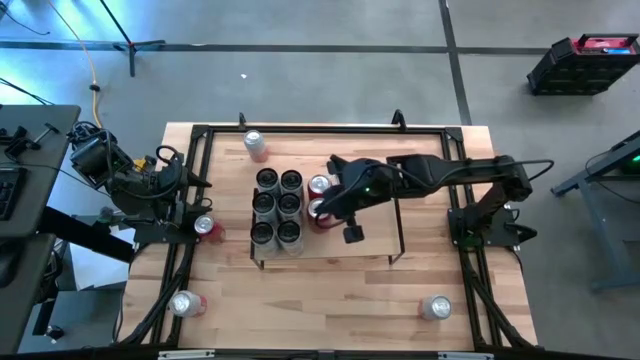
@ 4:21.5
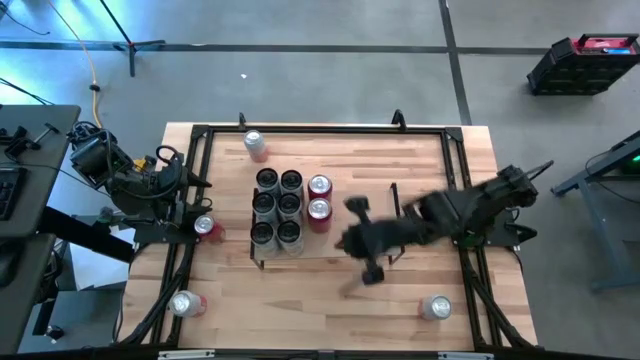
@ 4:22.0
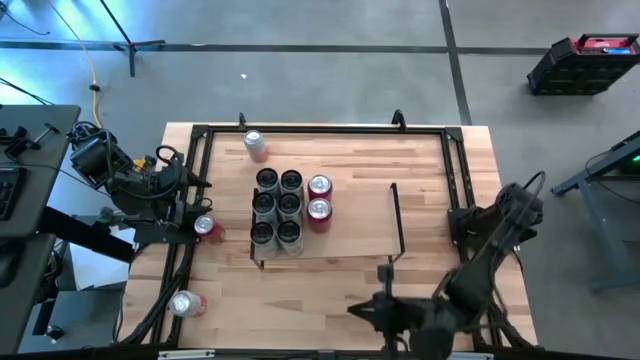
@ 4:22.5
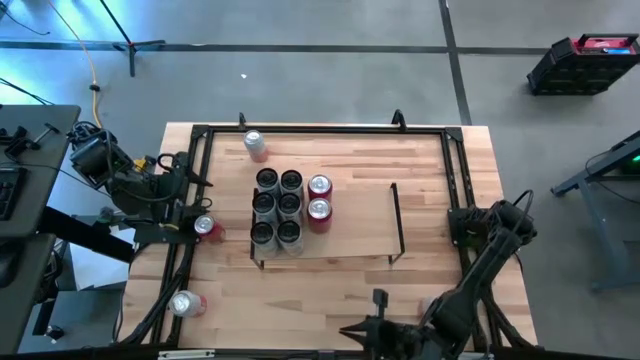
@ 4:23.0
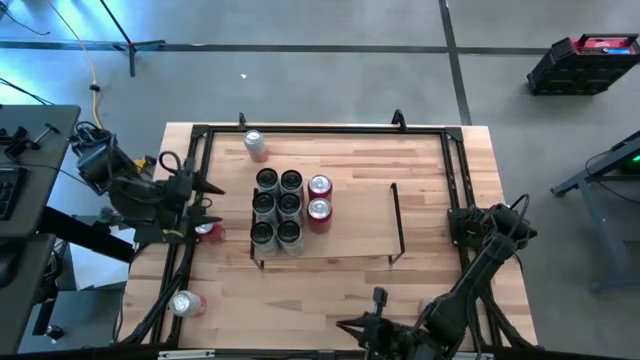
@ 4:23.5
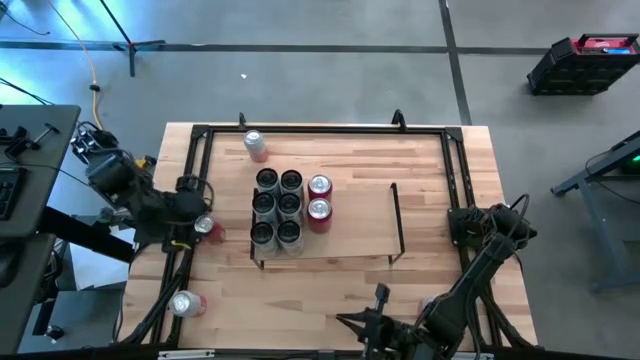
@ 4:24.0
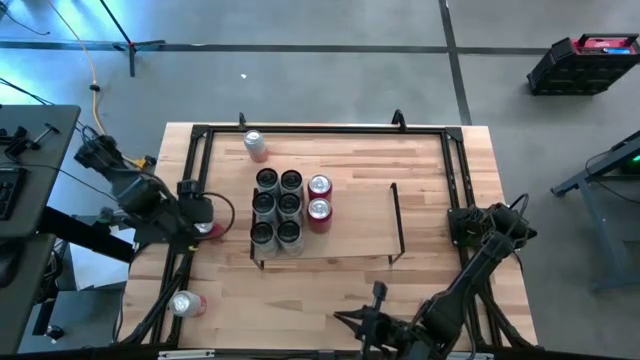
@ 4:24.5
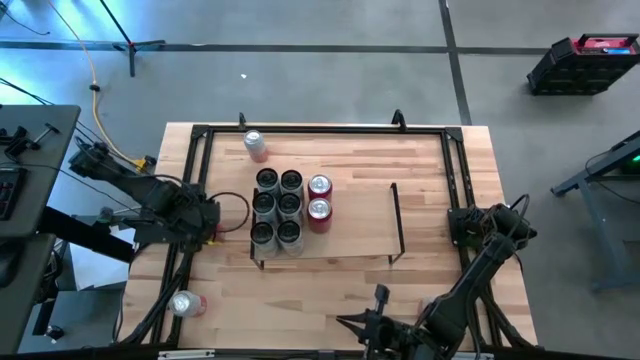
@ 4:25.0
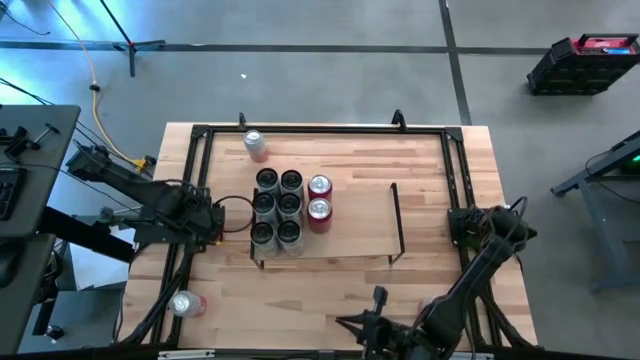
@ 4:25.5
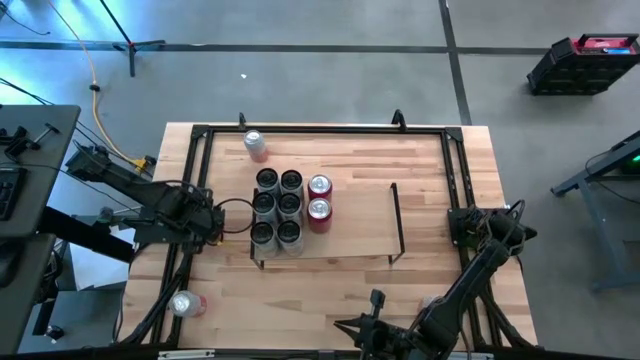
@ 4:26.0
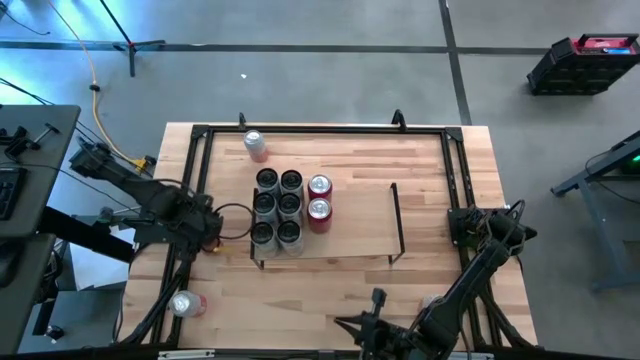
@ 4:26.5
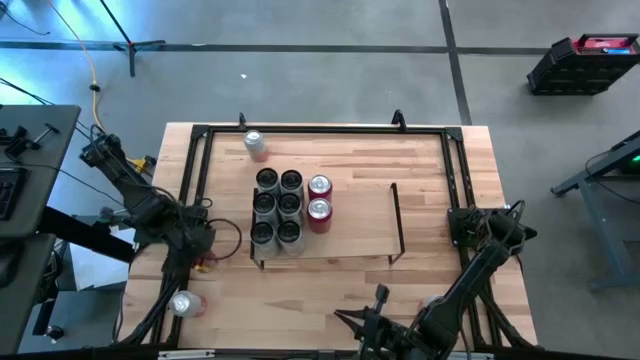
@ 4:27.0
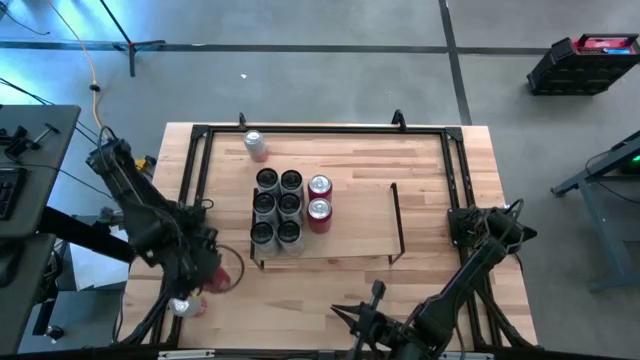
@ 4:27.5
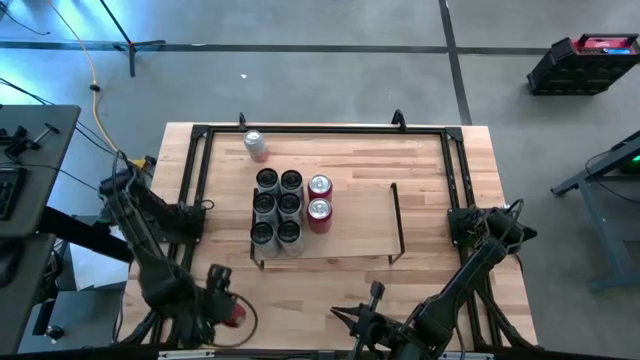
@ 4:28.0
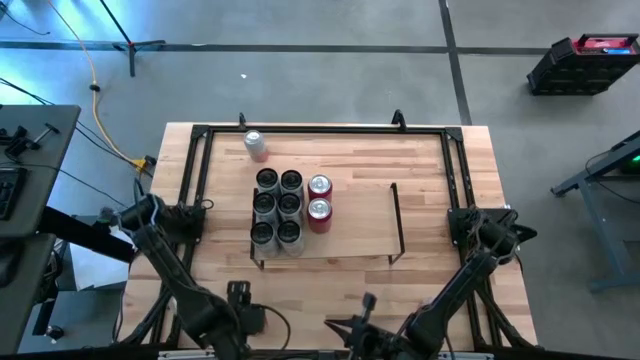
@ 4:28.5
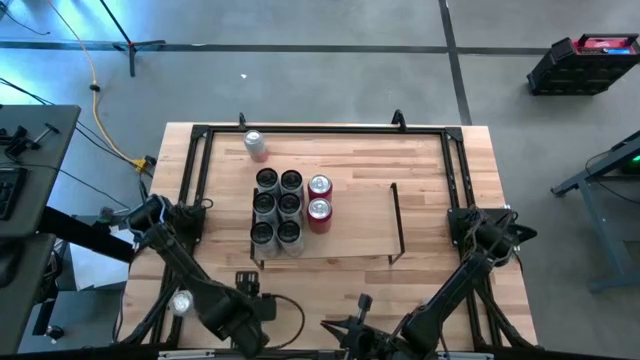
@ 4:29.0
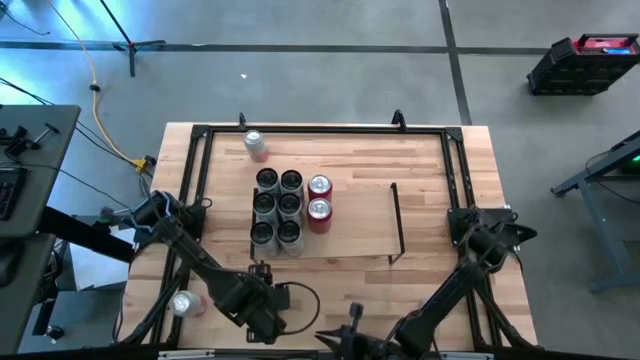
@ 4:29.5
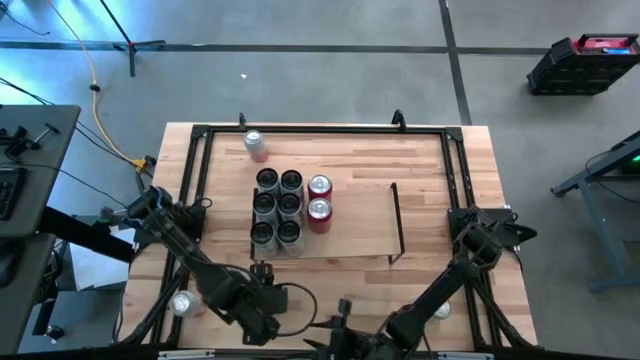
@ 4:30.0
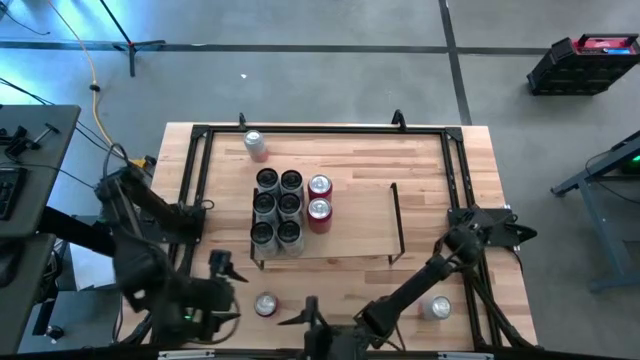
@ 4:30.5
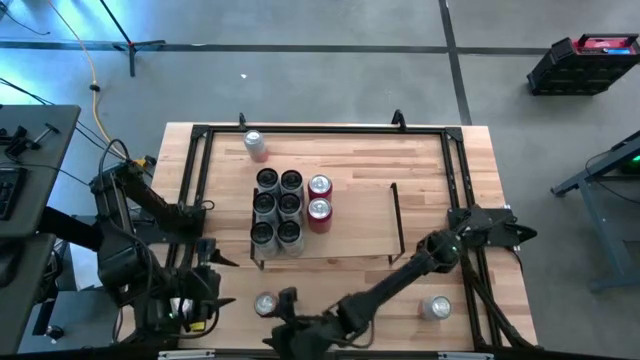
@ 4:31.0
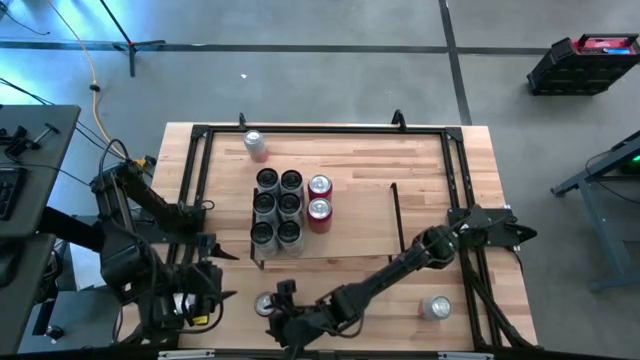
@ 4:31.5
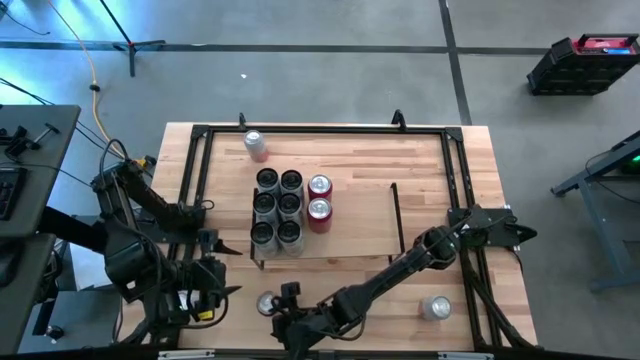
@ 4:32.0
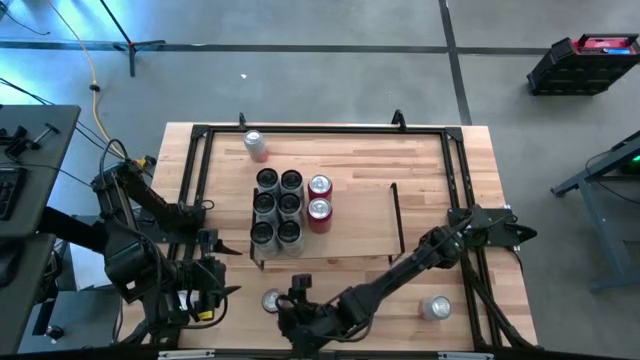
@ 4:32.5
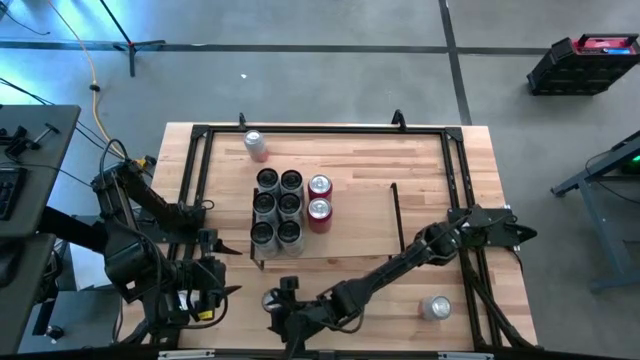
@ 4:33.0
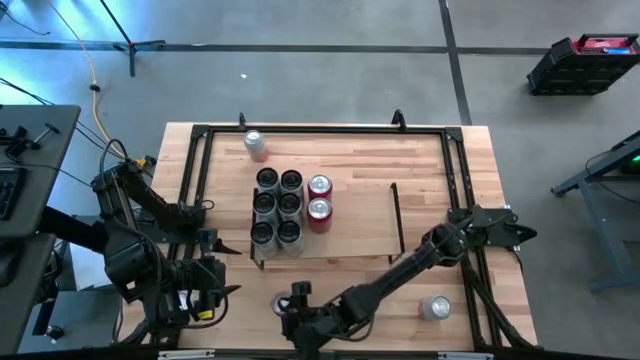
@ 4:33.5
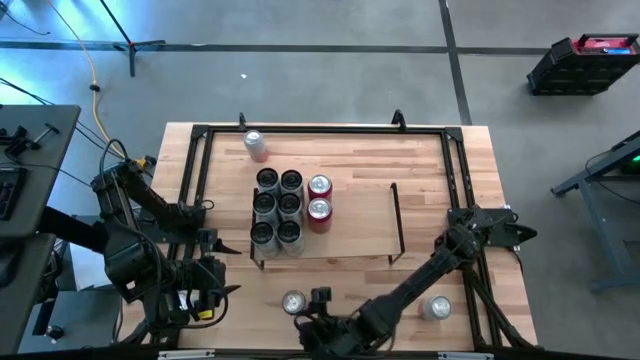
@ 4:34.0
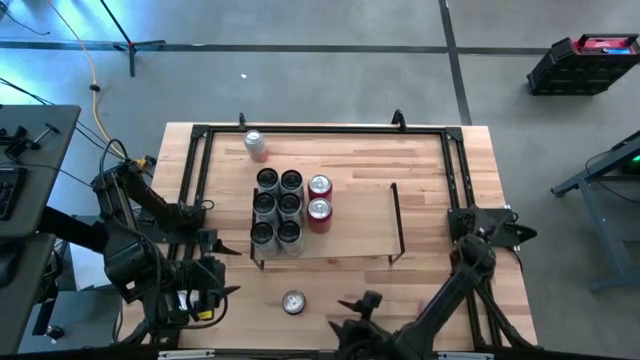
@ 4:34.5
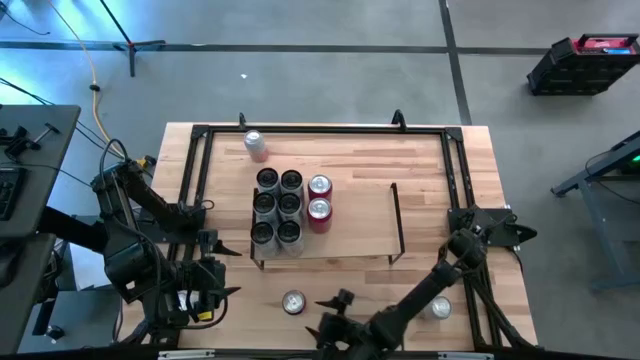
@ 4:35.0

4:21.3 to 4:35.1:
Task: Place canned beverage on shelf
Put the red soda can aligned with the other red soda cans on the shelf

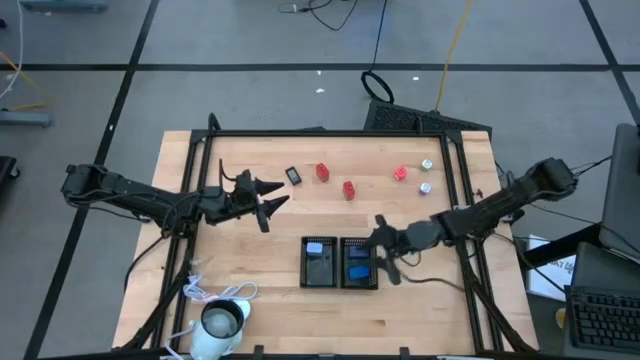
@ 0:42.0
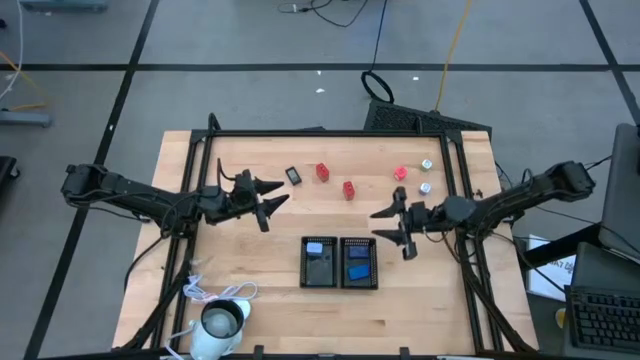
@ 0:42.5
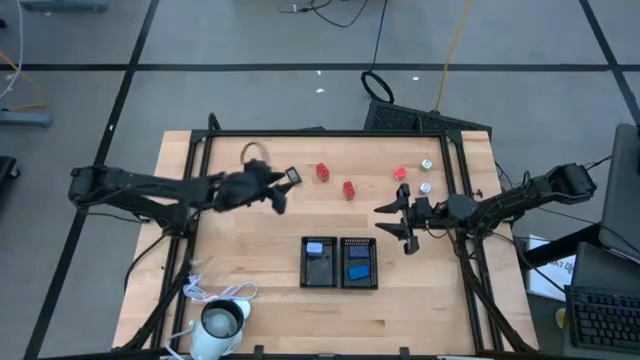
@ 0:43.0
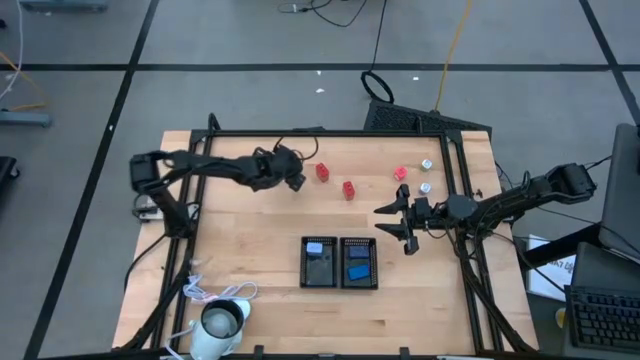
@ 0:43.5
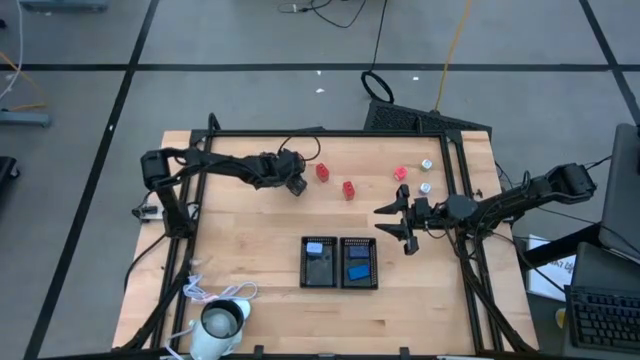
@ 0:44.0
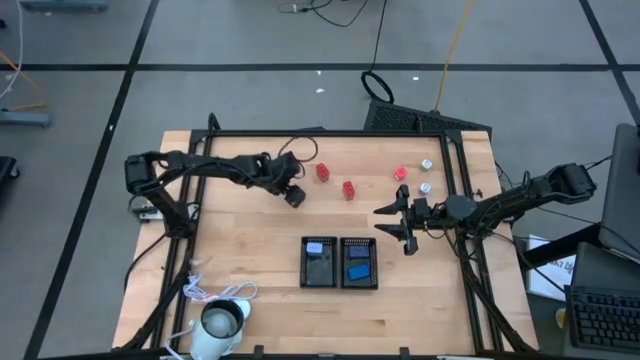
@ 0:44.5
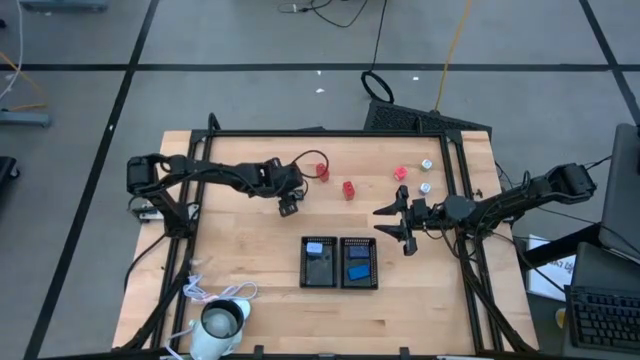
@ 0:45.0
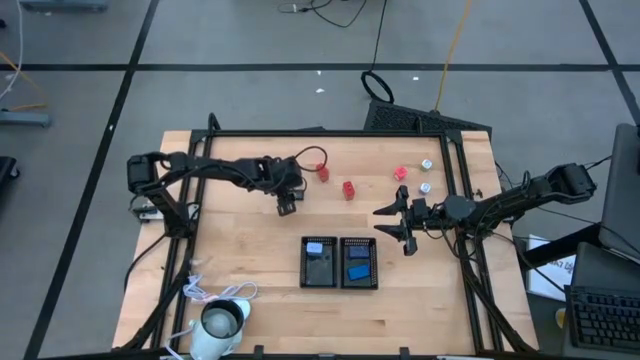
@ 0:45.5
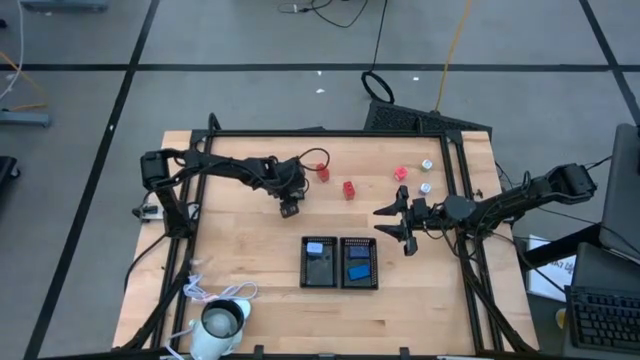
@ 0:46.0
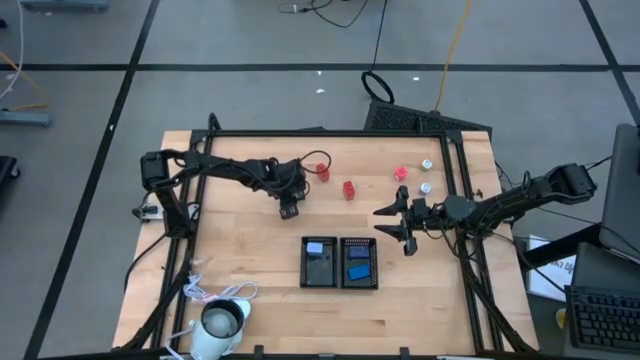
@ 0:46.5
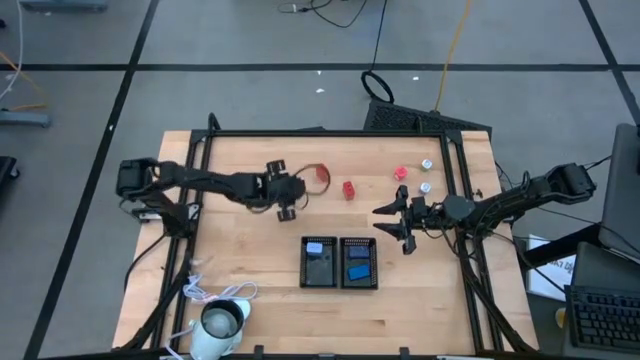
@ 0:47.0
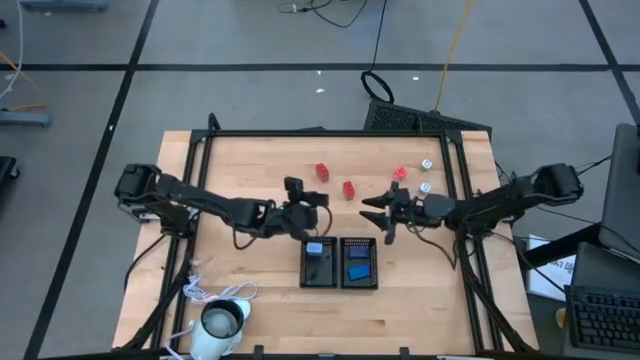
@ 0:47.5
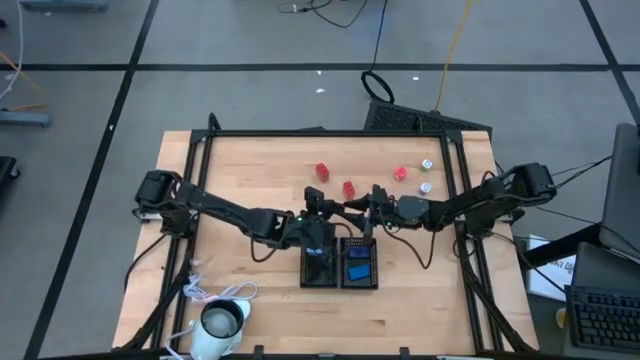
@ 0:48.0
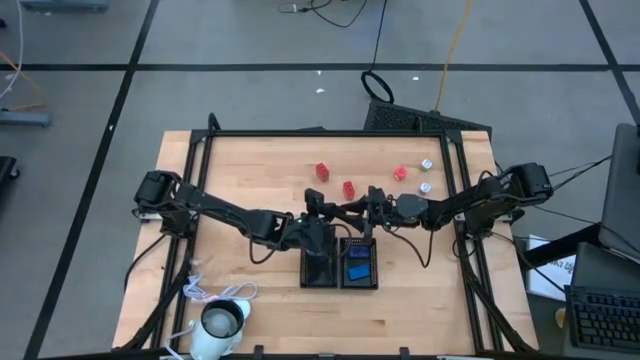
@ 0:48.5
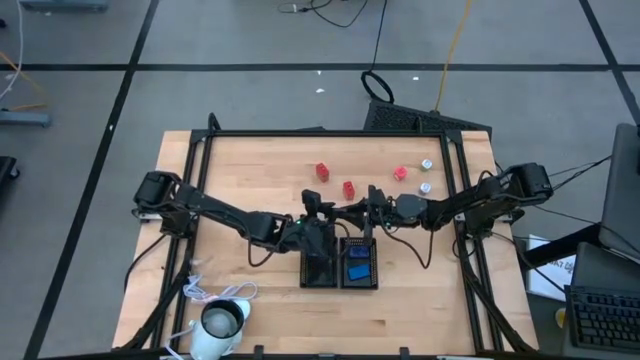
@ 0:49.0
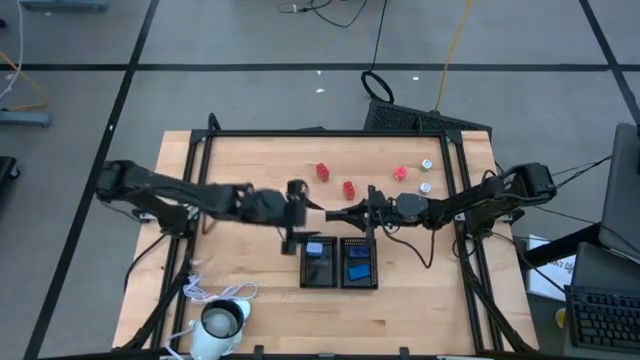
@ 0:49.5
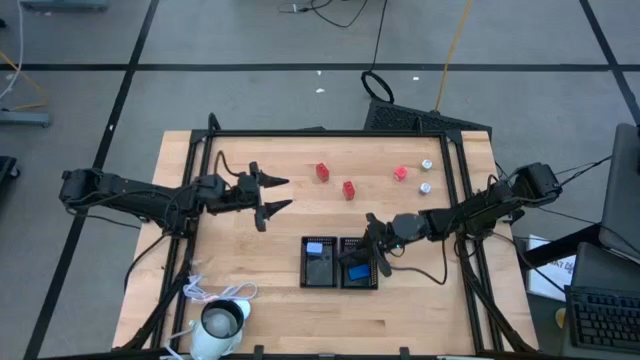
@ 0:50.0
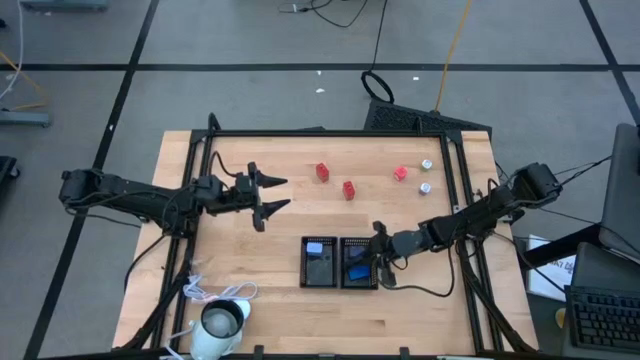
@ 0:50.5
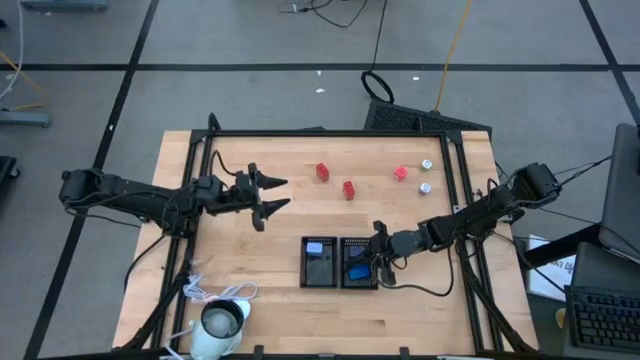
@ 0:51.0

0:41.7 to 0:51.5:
Task: Pick & Place Office items
Put the black digital clock into the right black basket
